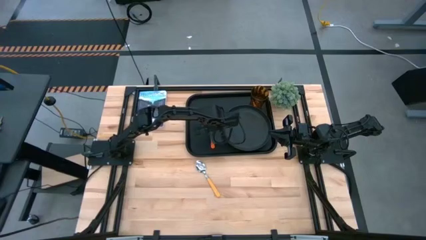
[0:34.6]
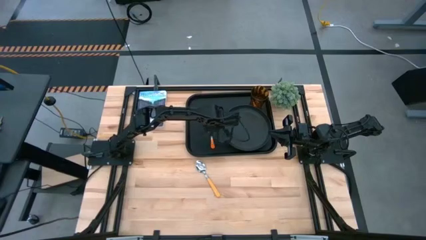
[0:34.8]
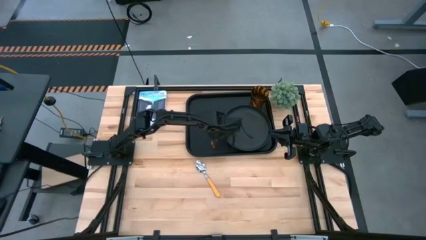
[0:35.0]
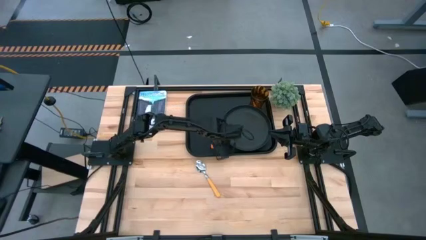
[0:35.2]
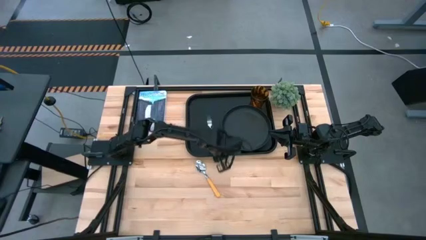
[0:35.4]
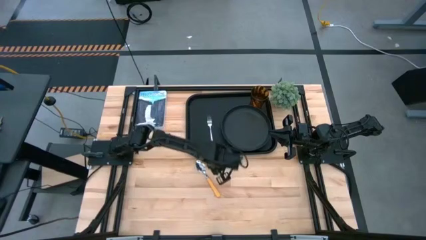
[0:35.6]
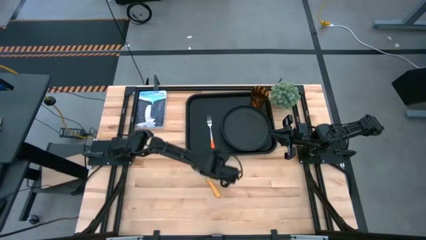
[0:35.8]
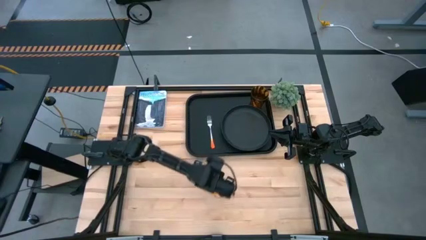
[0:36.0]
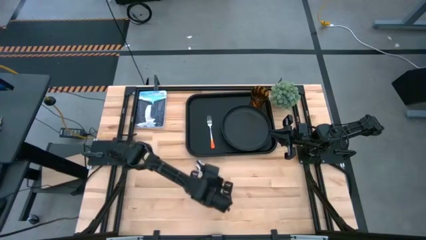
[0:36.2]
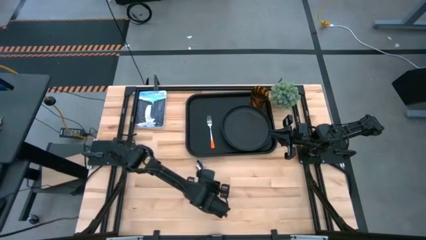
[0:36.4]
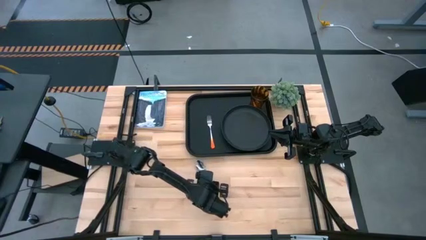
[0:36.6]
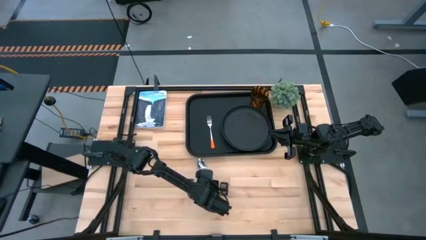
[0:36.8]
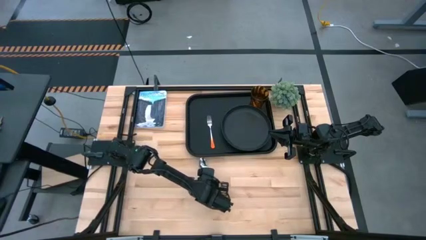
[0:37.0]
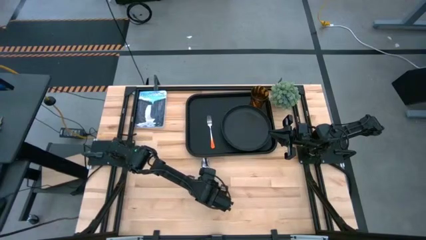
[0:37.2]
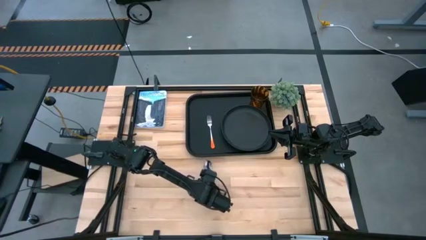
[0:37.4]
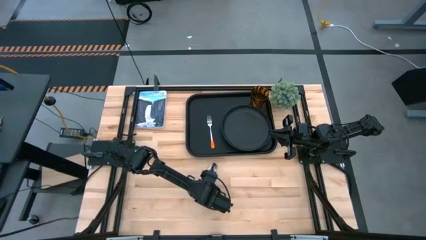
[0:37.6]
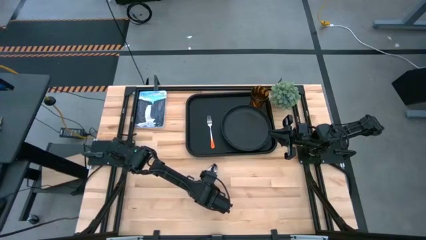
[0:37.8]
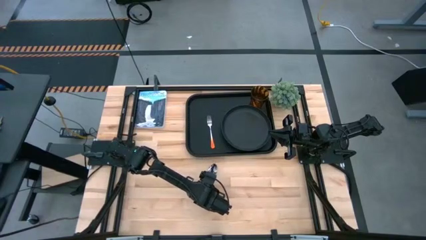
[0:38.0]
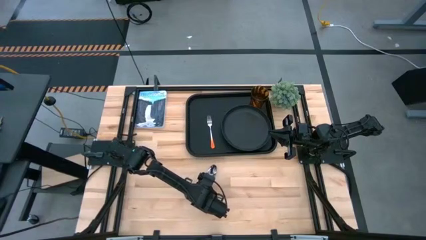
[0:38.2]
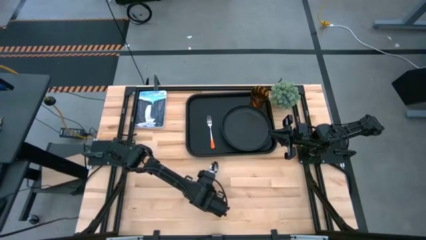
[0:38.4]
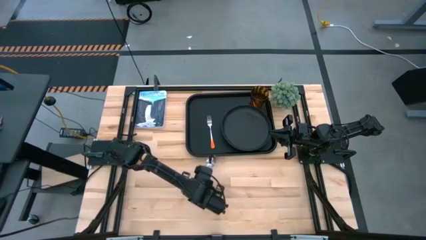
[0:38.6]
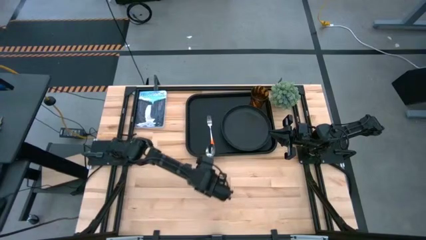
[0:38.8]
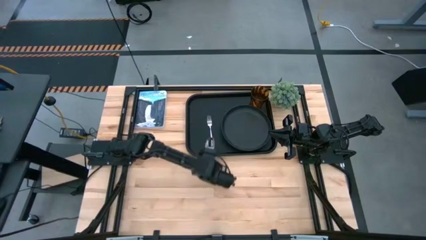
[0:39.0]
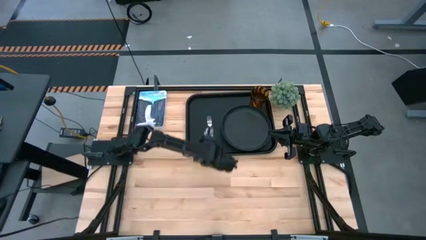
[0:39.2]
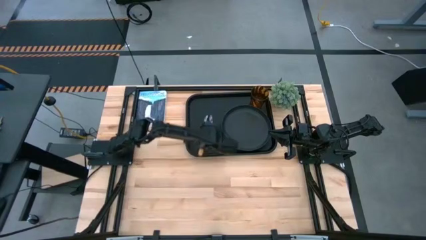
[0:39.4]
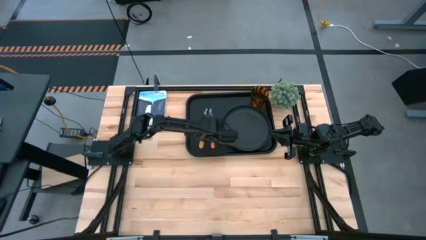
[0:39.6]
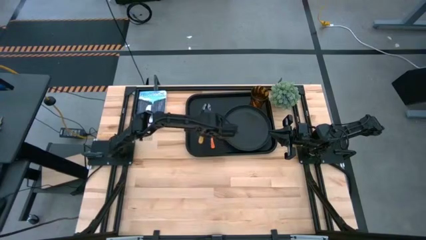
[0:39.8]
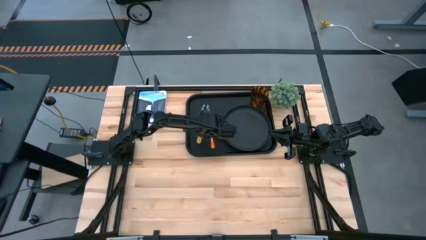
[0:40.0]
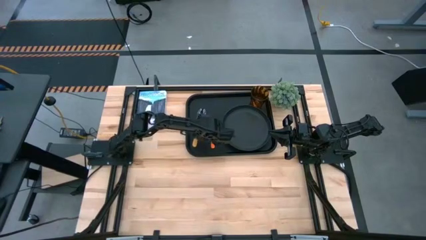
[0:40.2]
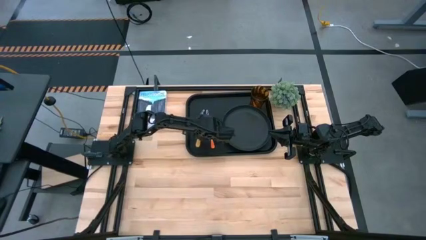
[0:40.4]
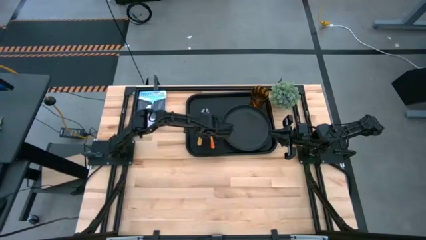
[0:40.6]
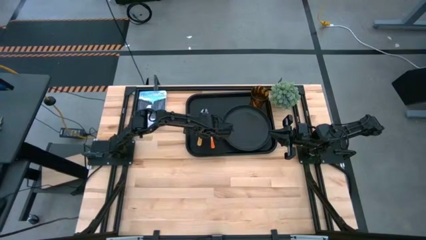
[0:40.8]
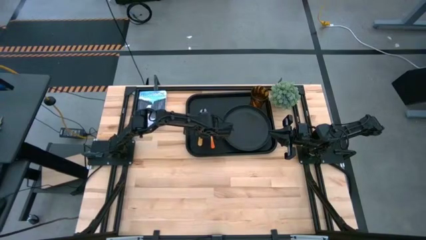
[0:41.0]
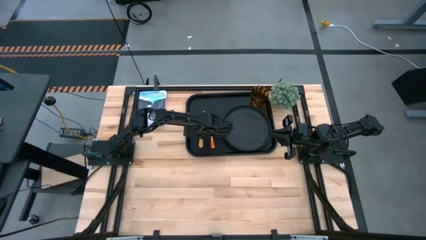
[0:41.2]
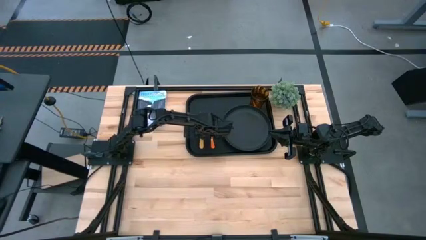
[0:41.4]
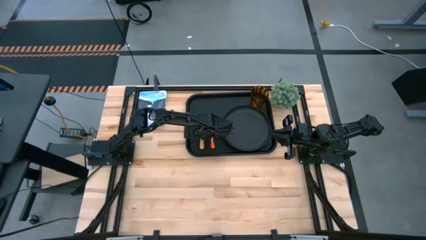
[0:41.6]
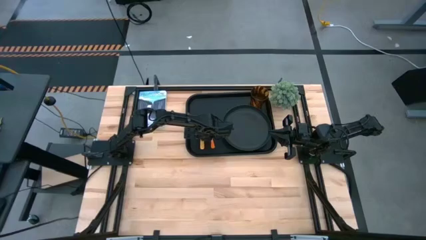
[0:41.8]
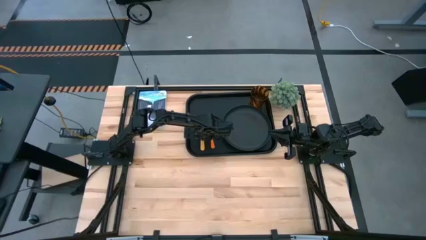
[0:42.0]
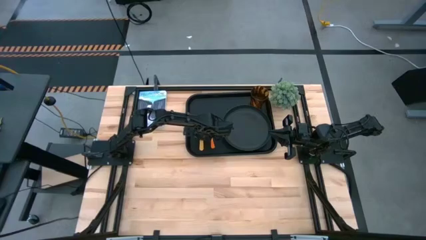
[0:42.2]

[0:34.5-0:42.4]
Task: Pick and place plate/cup/fork/spoon on tray
Put the yellow spoon on the black tray to the left of the orange fork

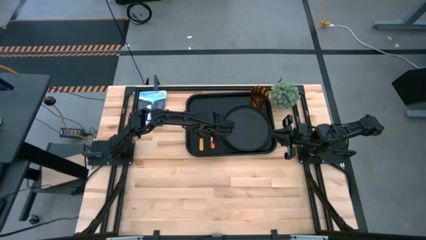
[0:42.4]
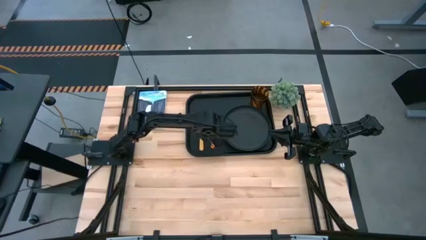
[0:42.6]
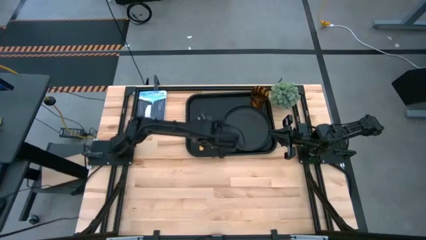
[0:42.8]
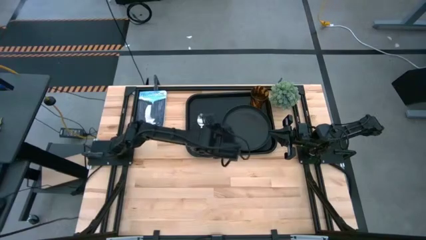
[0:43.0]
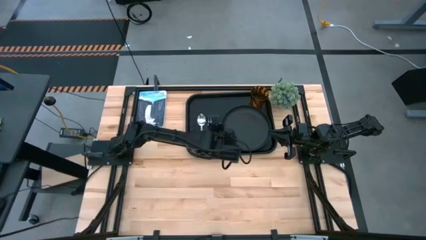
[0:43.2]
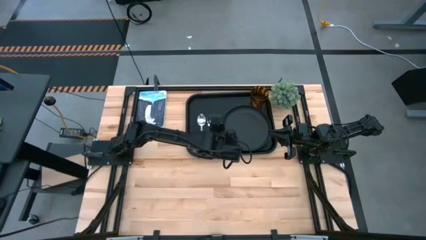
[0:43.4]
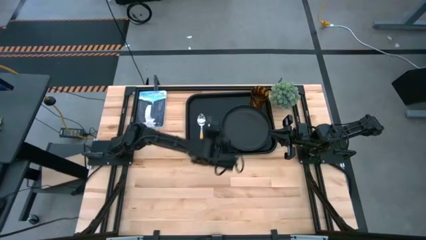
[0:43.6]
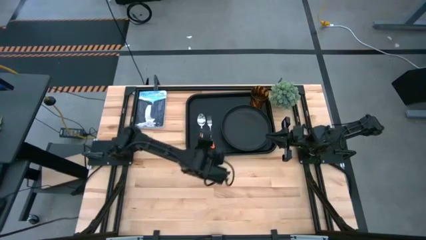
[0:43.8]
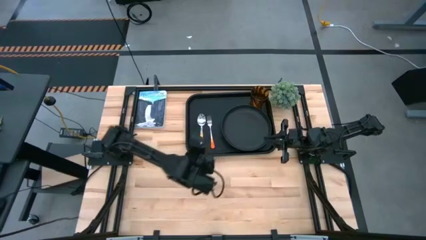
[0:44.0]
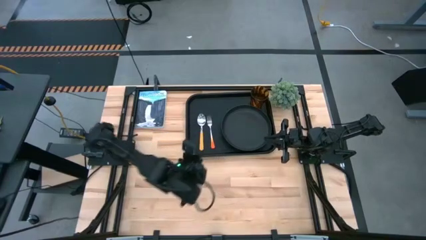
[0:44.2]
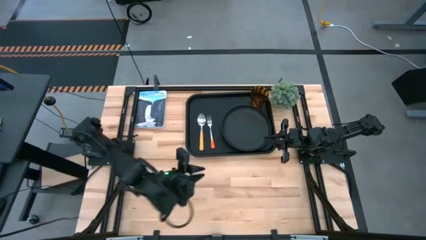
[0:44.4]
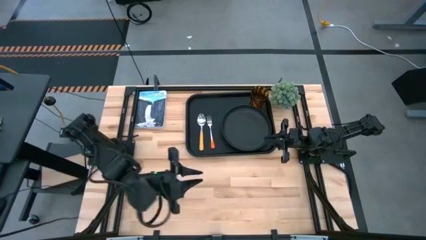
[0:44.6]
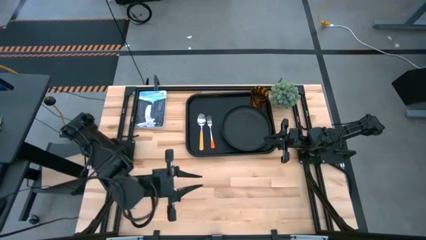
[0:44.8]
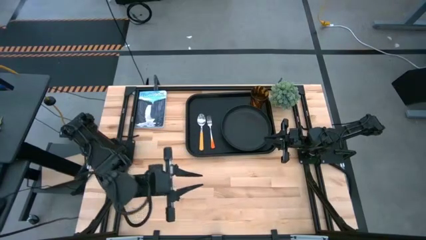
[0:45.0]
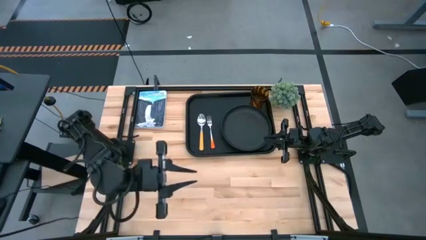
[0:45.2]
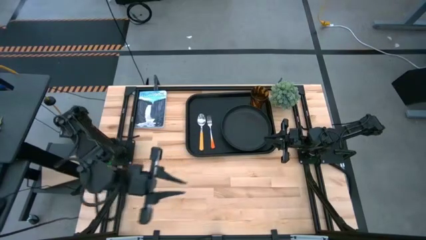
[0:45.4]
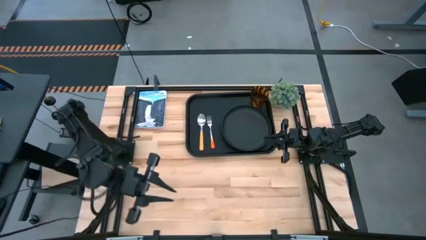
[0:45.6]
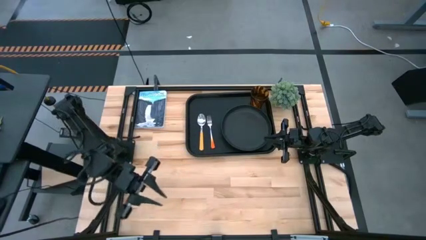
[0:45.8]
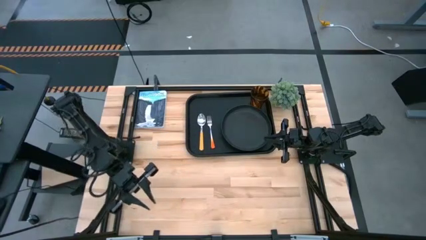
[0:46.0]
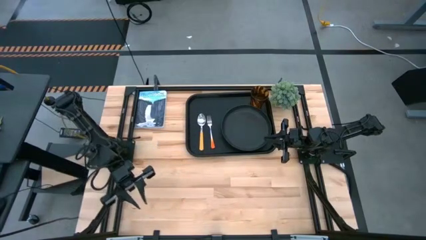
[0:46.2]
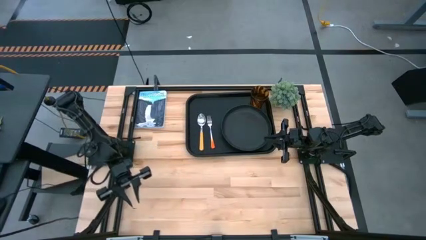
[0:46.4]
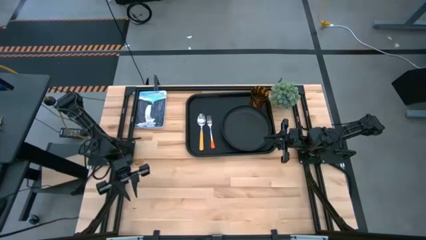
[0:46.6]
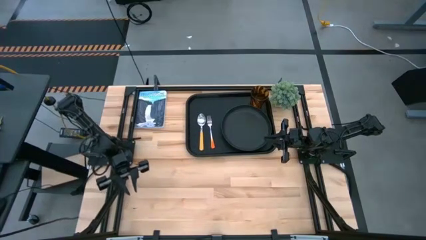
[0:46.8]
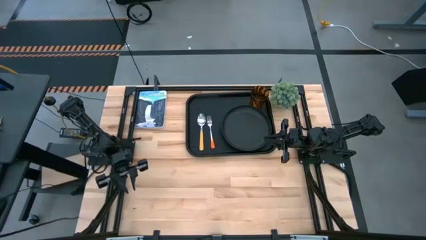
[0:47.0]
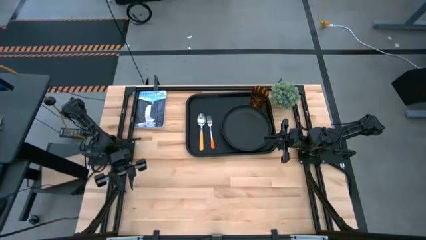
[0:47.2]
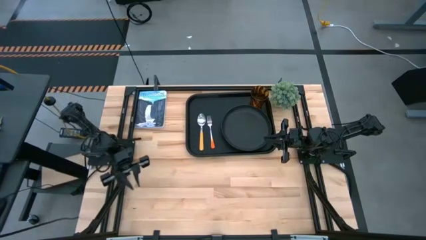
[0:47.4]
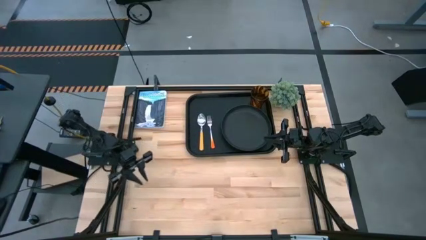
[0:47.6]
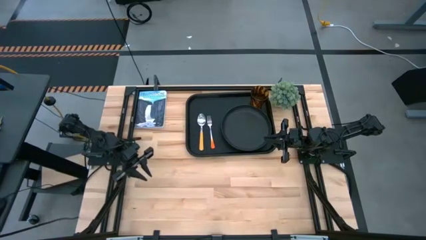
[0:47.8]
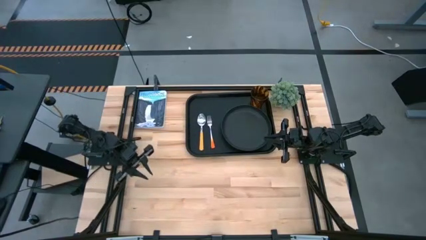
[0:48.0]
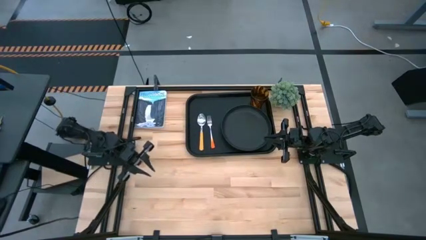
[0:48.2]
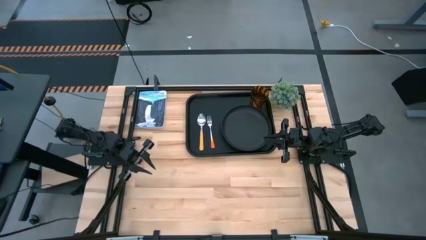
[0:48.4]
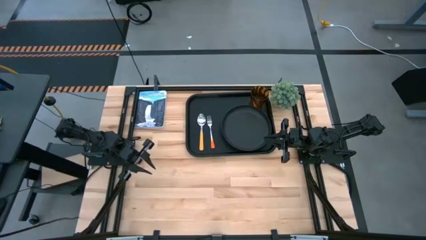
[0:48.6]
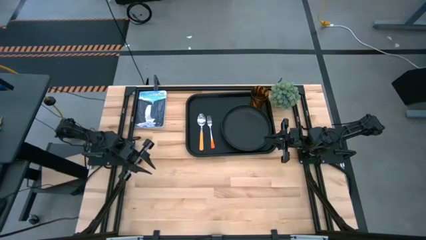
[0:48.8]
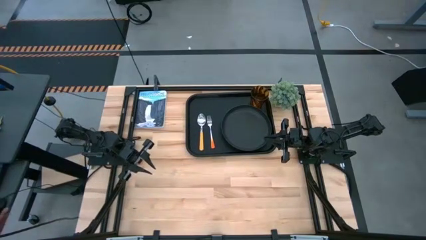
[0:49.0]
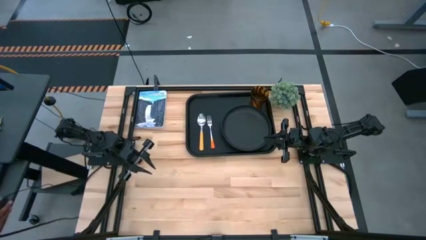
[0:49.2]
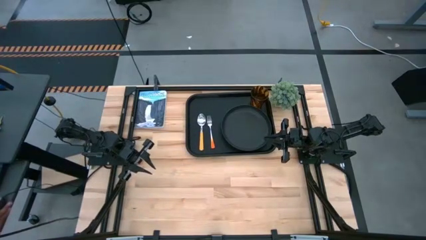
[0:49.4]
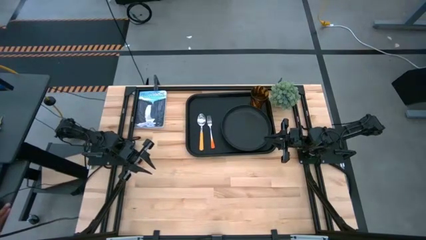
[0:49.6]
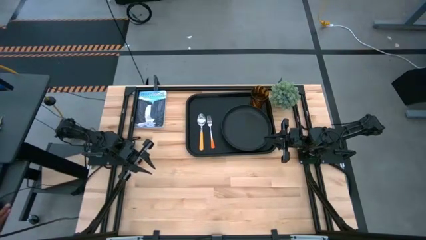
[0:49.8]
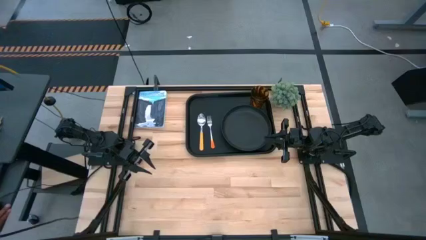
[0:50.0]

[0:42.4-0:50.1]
Return to Home Position
